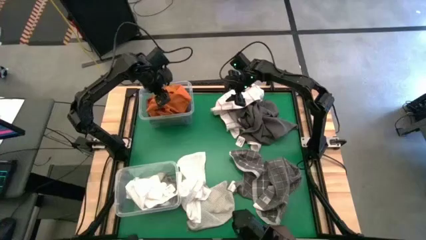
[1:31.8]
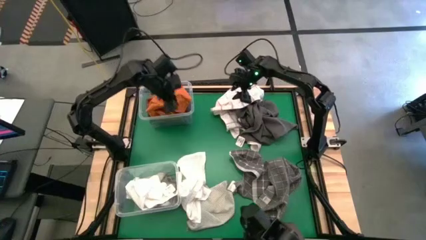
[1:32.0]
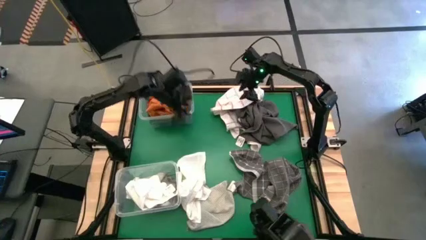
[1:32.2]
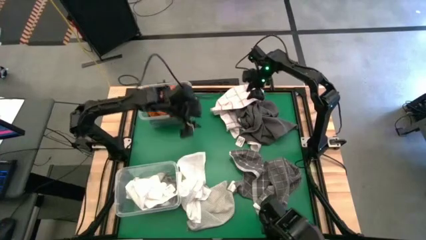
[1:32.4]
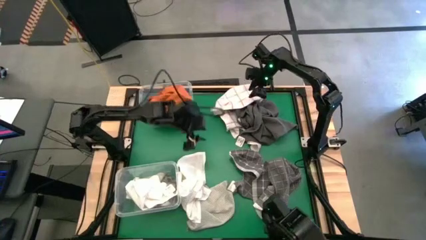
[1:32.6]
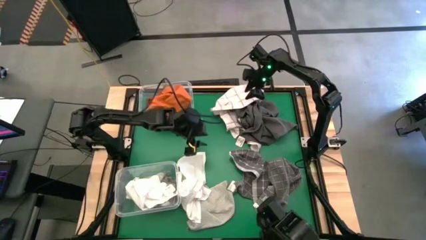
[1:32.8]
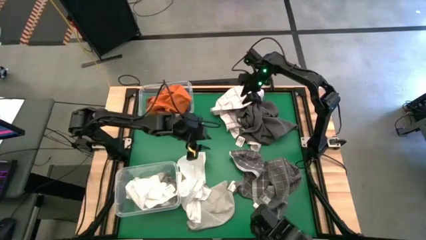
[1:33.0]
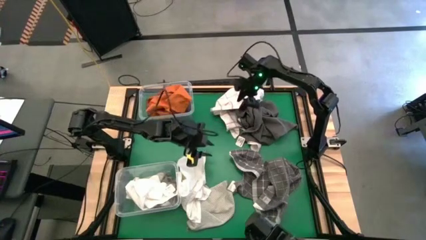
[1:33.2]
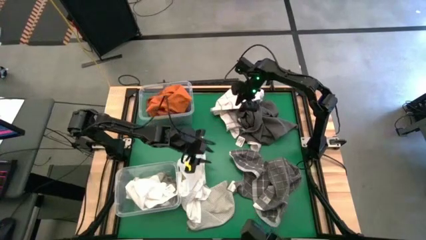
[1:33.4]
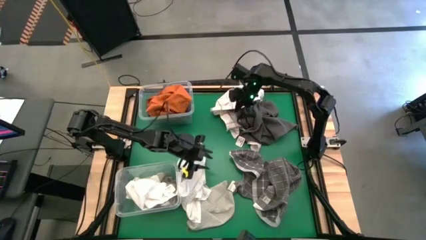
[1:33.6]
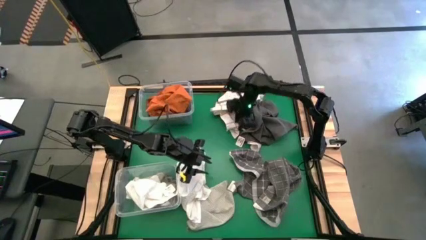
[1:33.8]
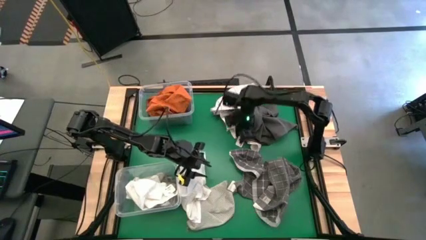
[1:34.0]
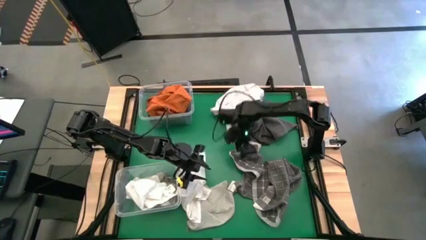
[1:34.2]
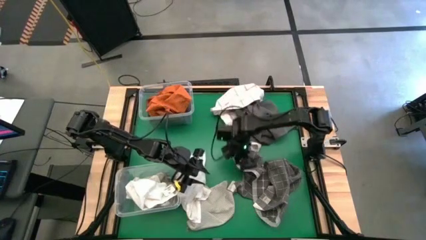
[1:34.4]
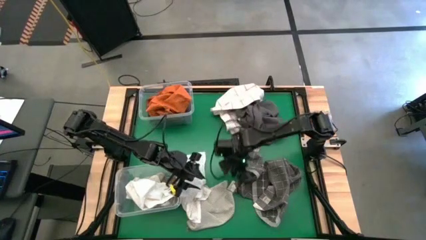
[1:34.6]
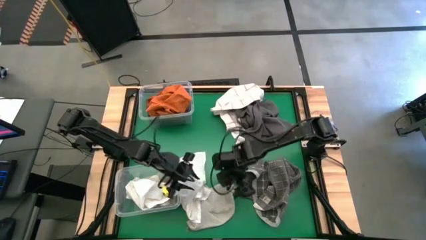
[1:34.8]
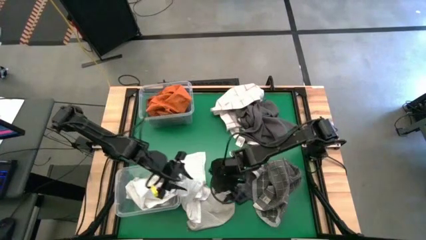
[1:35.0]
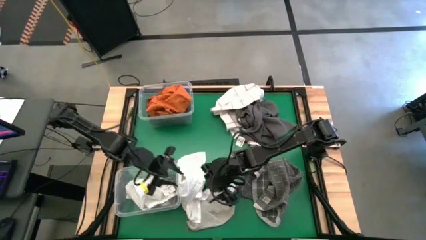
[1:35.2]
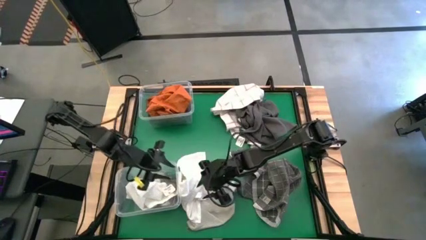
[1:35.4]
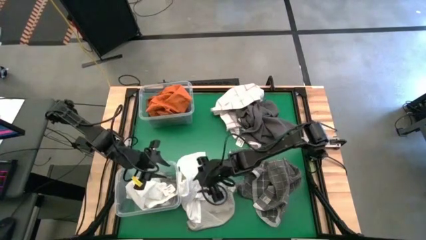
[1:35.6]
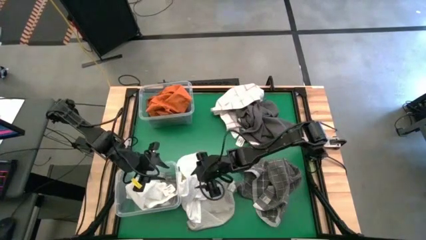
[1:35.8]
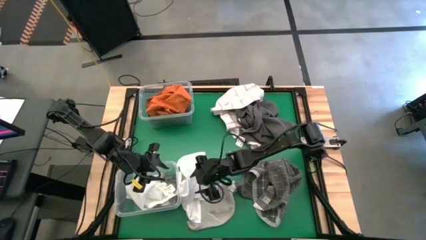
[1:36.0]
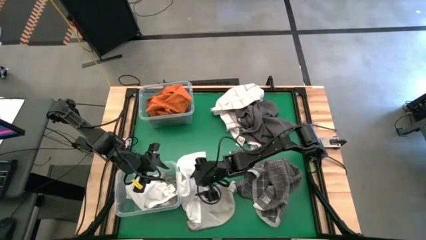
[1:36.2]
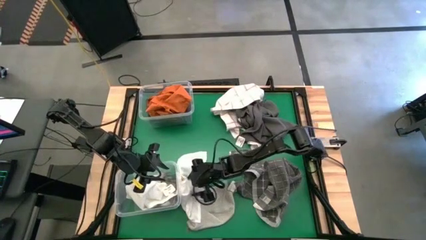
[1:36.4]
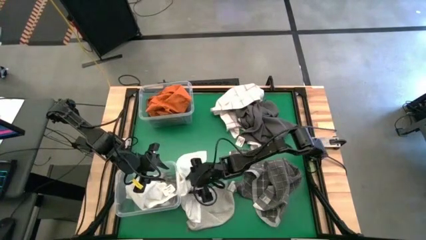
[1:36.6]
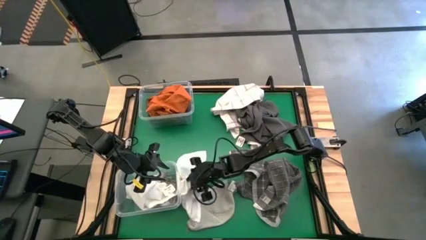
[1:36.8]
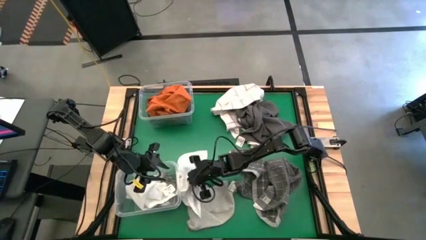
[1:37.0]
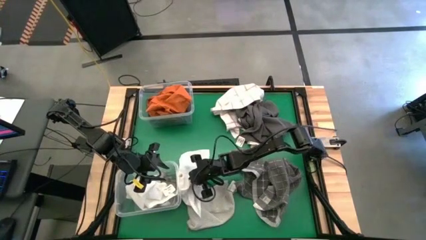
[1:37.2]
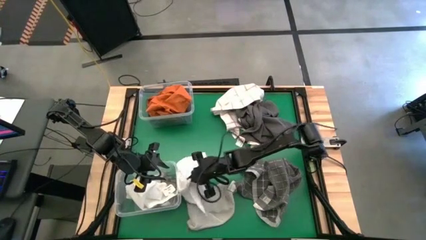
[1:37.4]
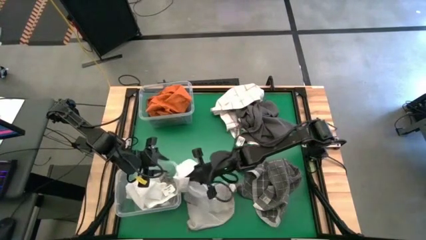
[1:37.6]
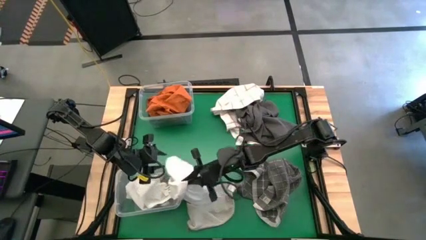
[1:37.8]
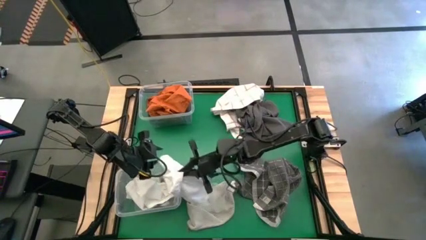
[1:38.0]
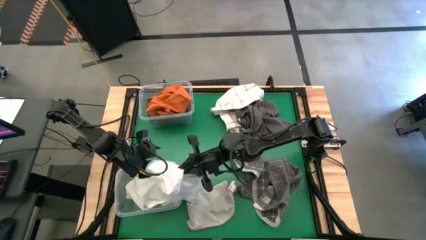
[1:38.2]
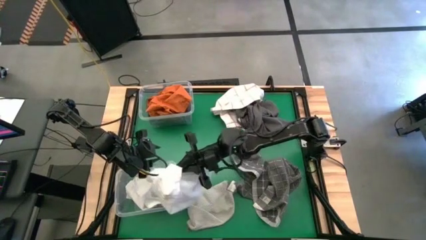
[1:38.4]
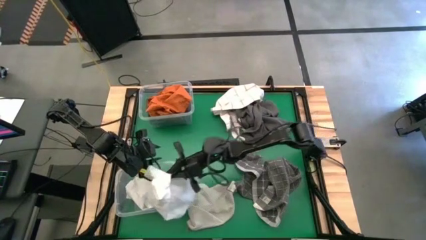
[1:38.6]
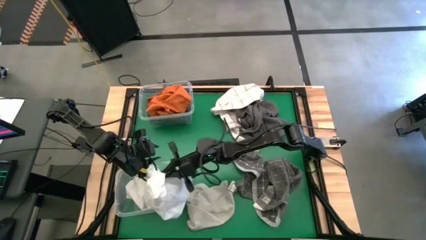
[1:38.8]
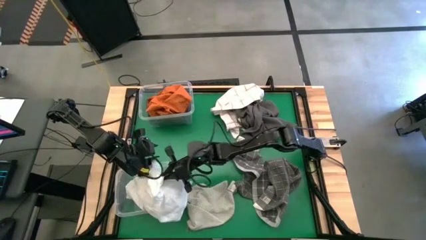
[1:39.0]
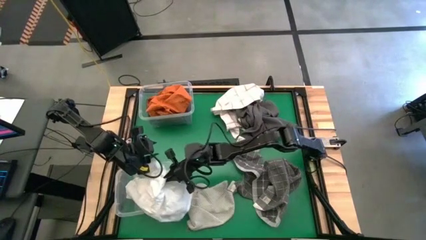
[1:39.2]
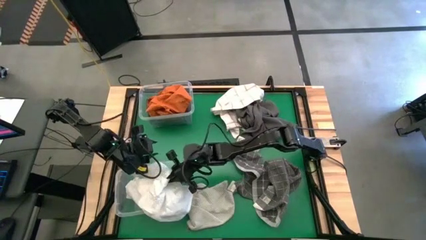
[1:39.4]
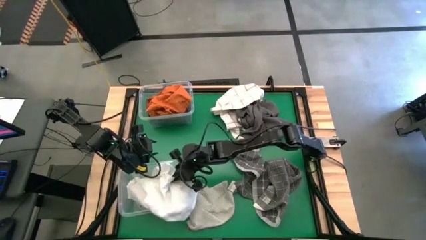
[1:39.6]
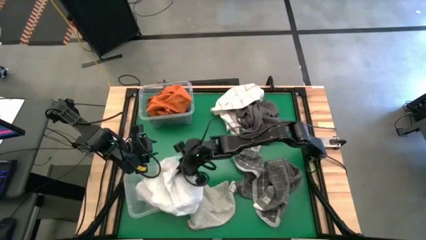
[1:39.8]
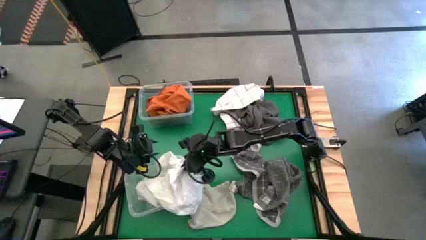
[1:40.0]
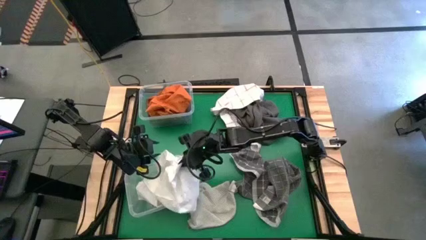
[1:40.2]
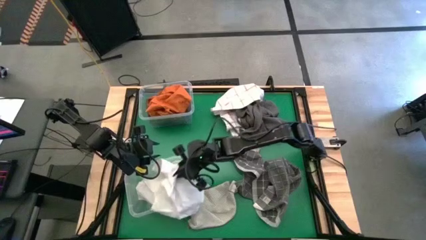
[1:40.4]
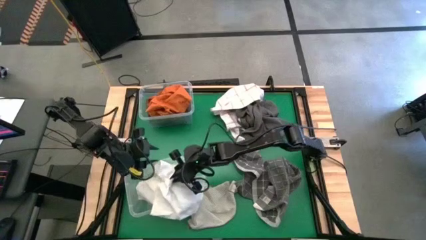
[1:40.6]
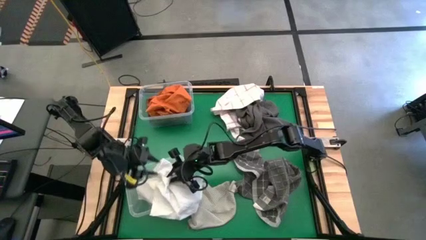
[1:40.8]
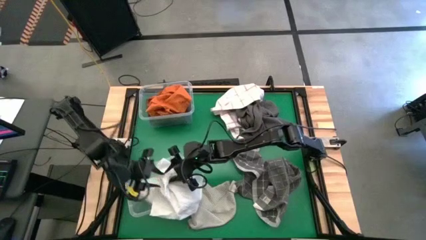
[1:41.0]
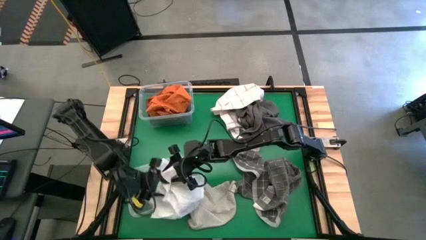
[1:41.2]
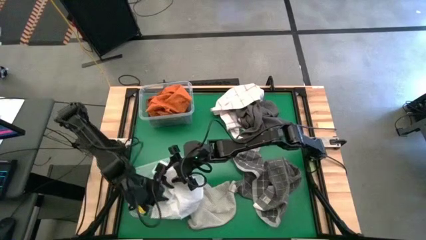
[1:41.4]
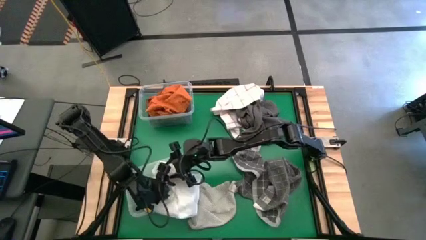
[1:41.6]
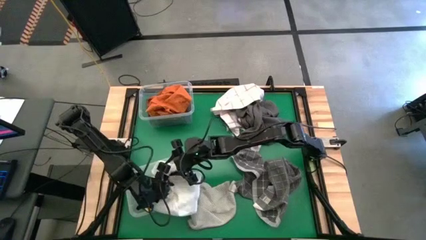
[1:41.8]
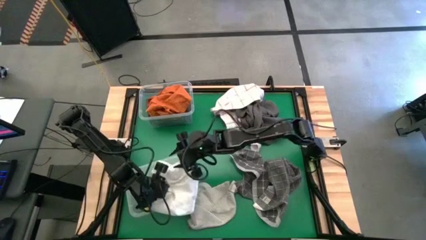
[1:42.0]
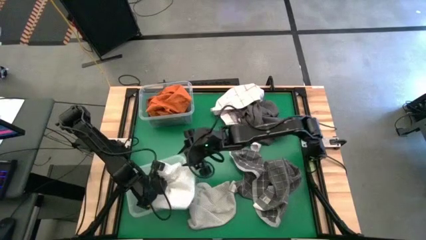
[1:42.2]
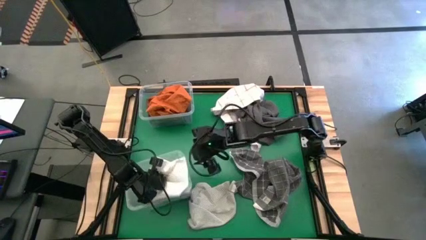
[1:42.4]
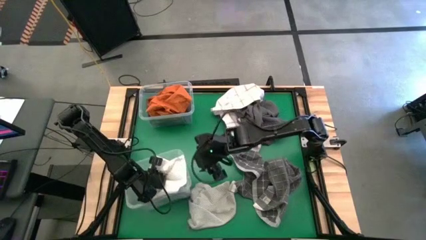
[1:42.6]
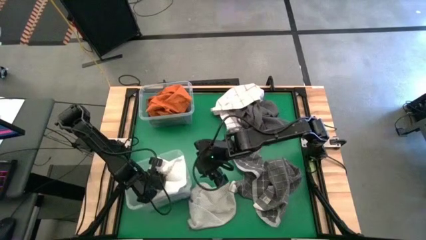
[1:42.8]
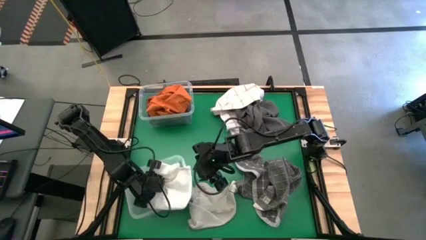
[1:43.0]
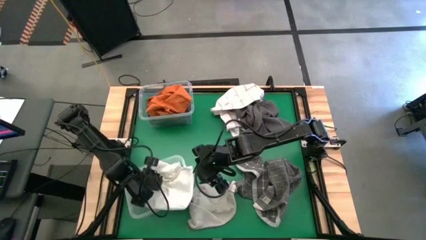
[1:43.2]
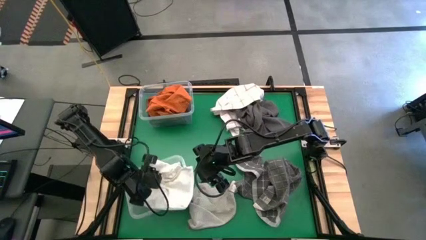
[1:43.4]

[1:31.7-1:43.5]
Task: Sort towels by color in basket
Put the white towel into the bottom transparent bin

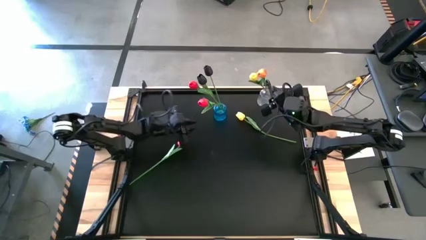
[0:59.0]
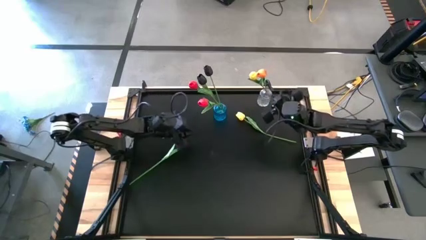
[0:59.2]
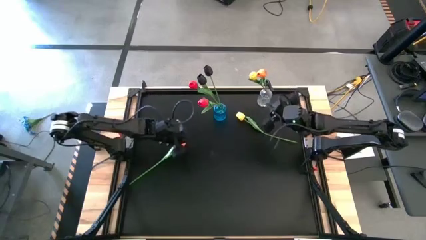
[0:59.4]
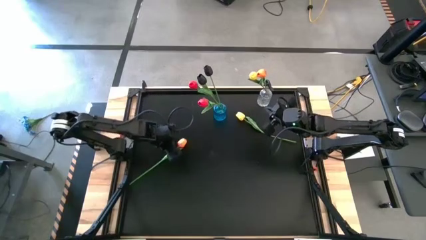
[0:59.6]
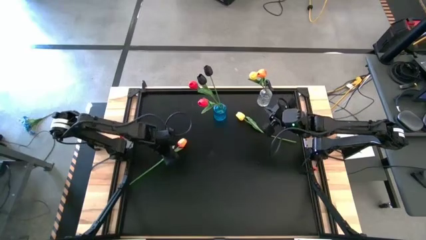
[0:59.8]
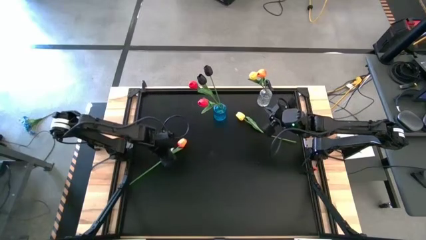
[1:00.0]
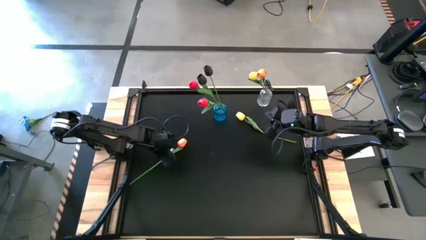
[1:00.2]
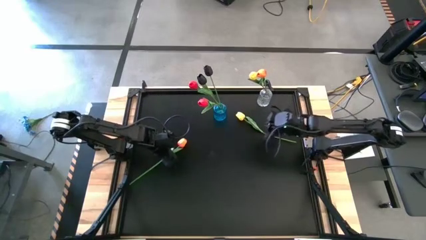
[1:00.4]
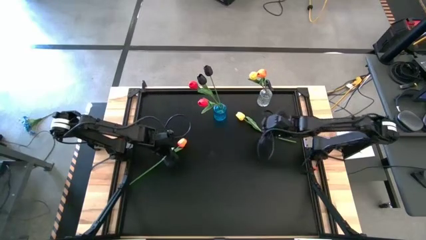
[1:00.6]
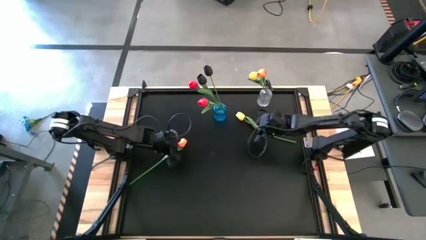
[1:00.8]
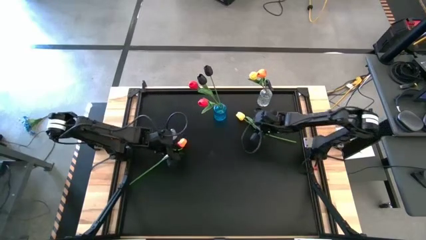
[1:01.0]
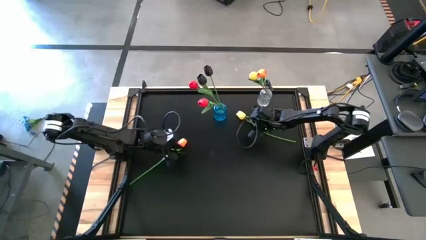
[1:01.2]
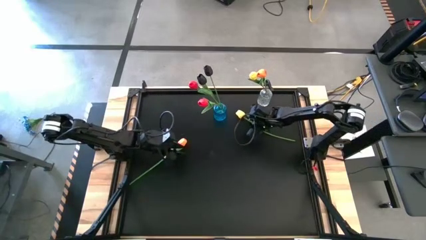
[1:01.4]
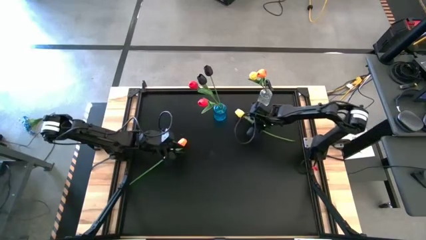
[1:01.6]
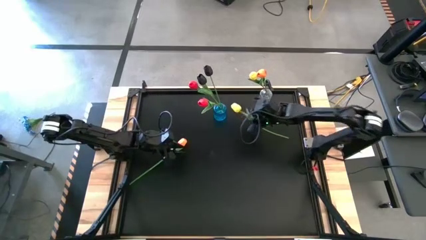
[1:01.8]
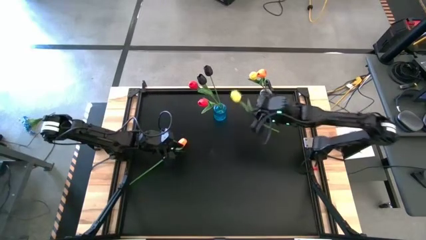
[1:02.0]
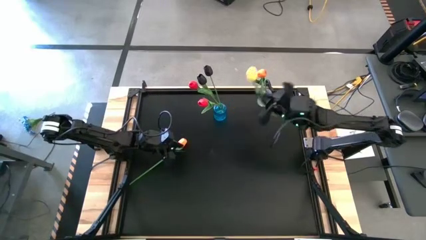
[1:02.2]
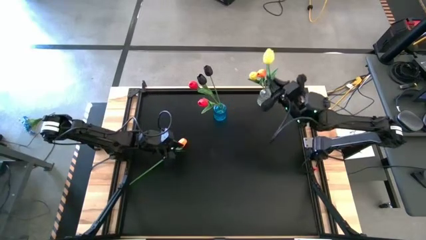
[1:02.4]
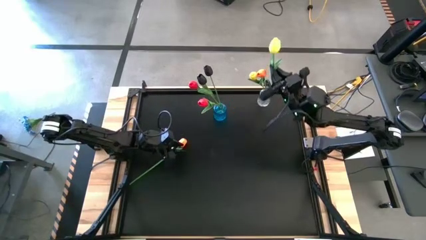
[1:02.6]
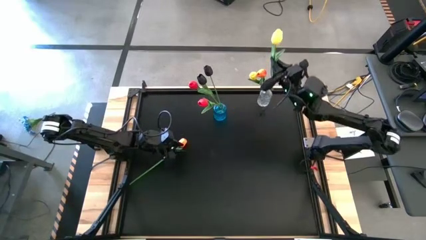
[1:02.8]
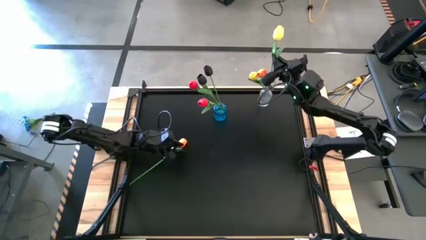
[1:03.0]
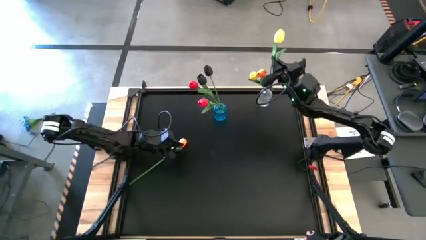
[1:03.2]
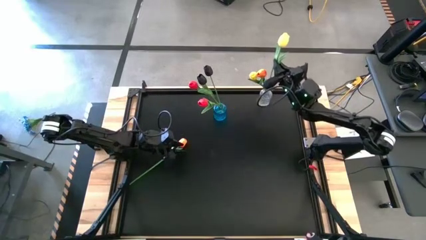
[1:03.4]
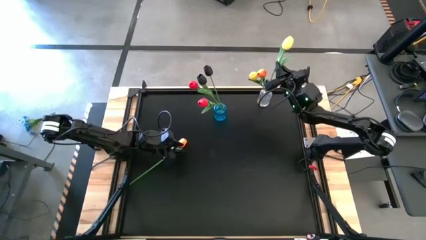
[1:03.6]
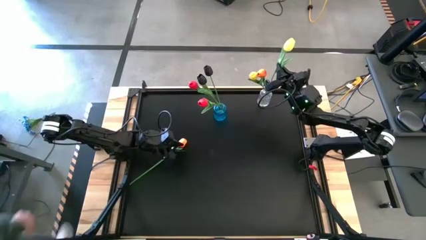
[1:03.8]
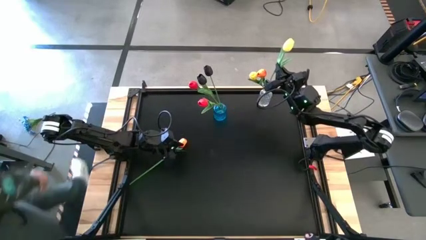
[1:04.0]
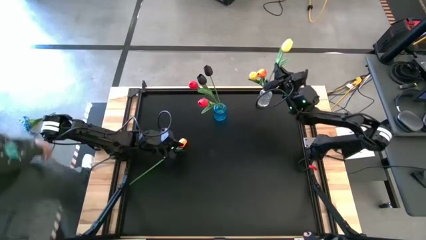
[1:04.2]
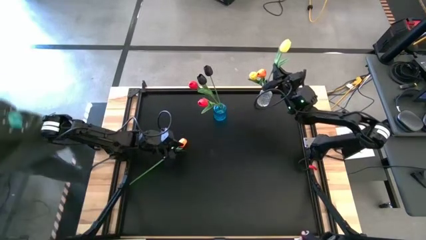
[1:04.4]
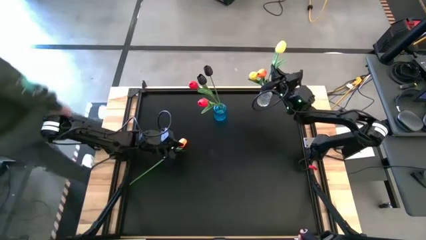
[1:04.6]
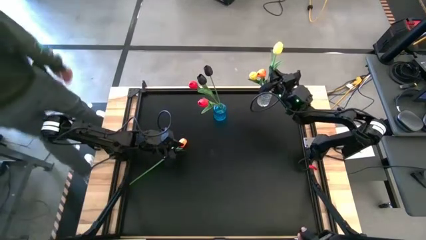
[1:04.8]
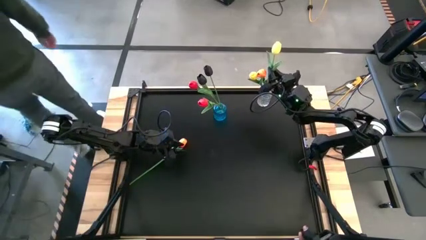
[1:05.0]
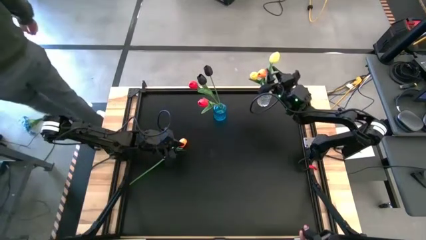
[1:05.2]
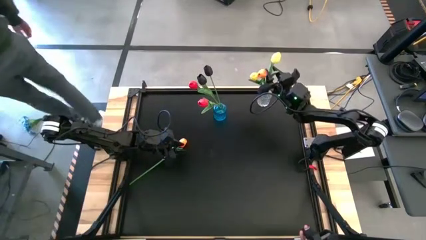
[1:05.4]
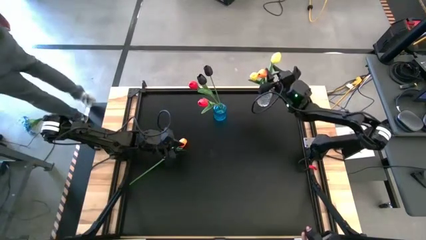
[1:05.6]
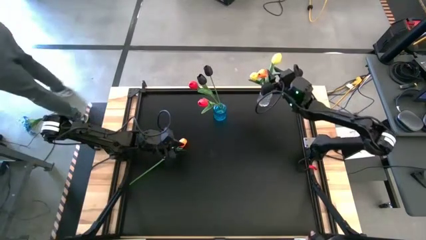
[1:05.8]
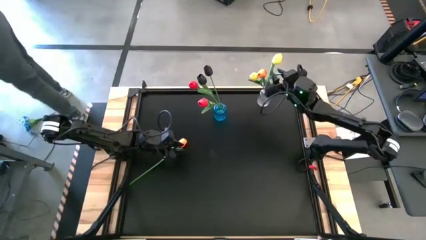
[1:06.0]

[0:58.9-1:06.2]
Task: Sort flowers into vase by color
Put the yellow flower into the transparent vase
